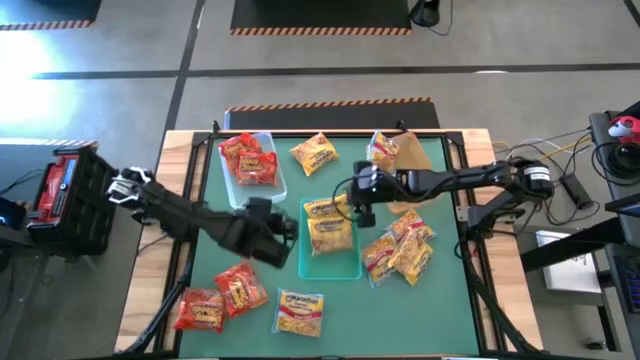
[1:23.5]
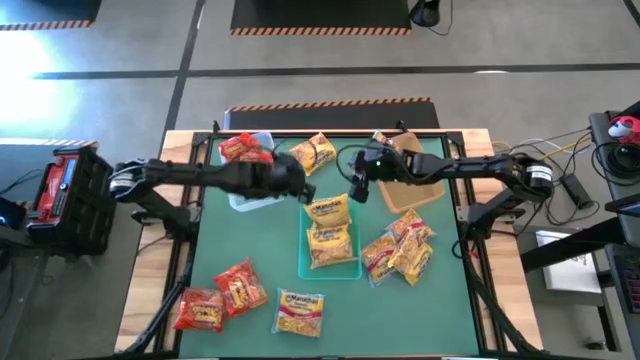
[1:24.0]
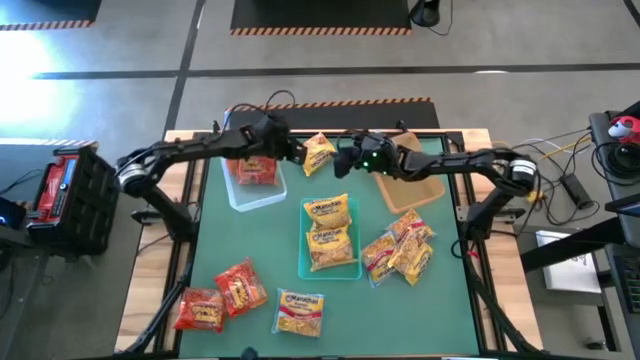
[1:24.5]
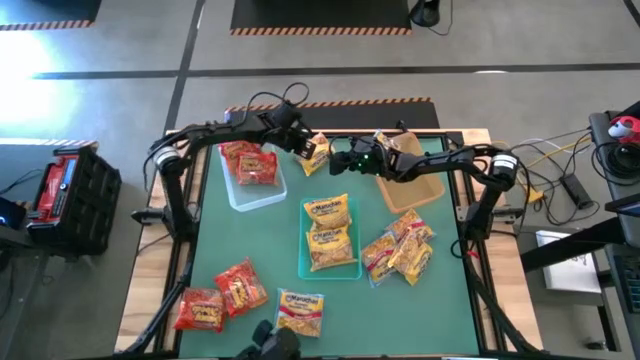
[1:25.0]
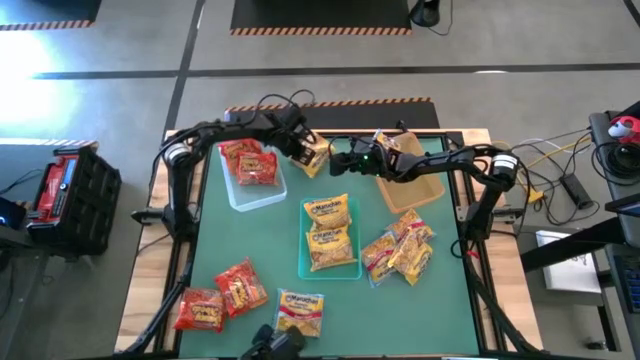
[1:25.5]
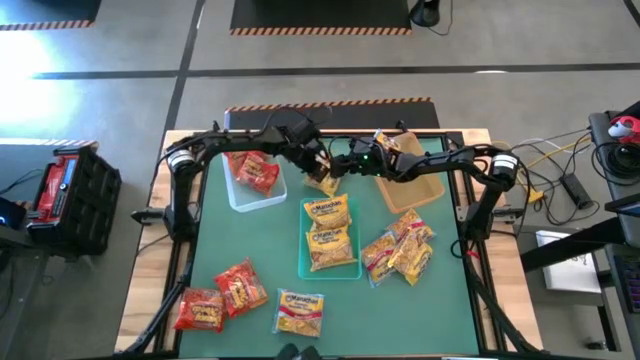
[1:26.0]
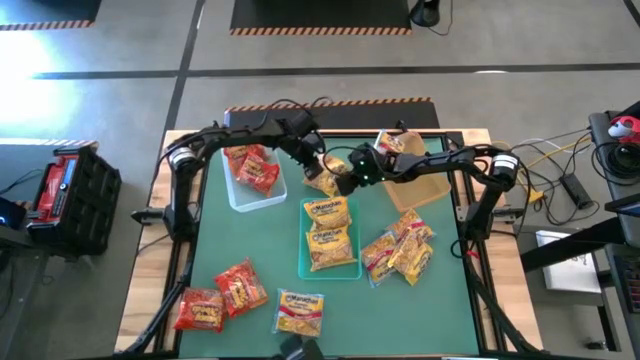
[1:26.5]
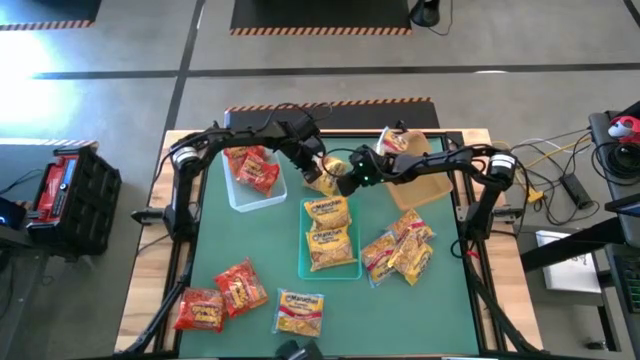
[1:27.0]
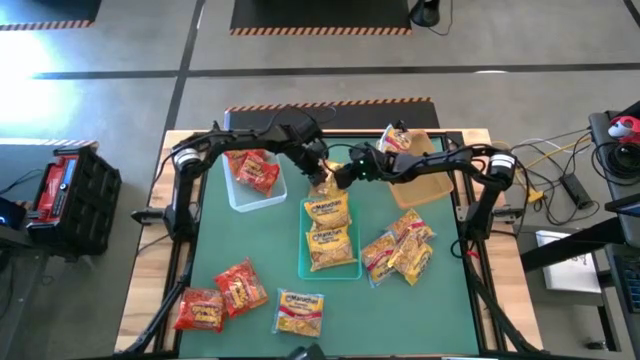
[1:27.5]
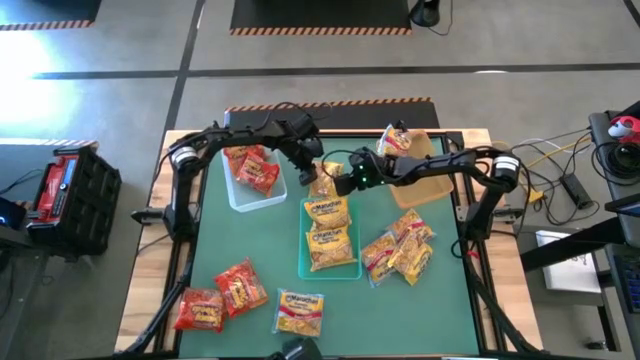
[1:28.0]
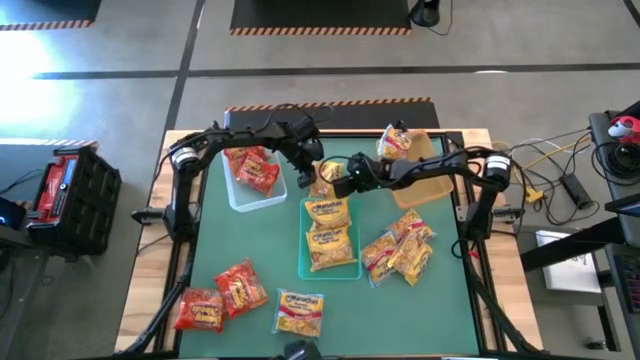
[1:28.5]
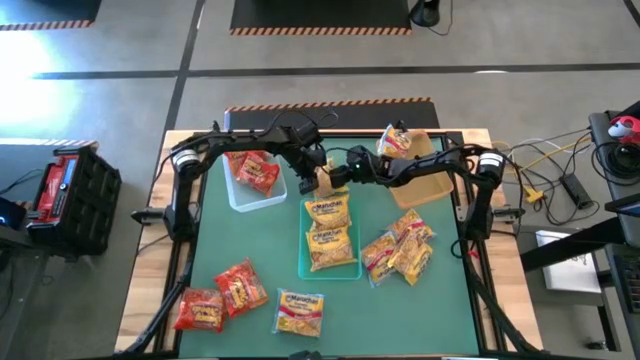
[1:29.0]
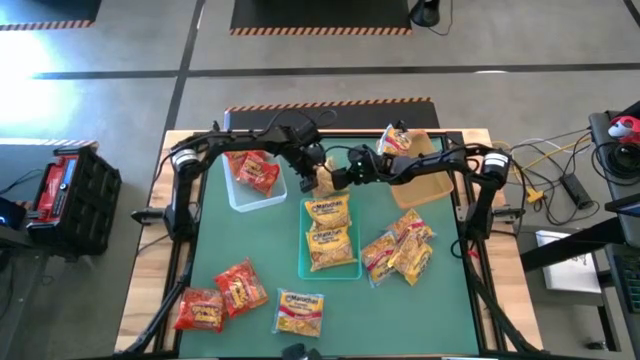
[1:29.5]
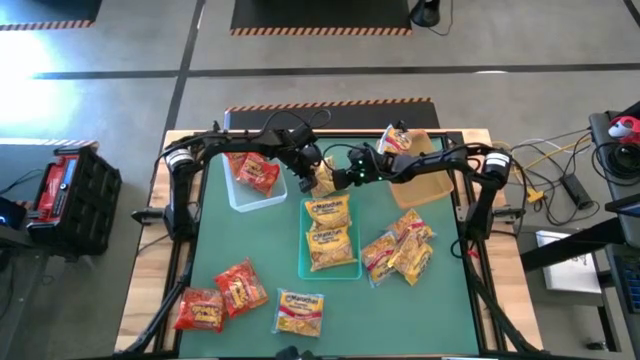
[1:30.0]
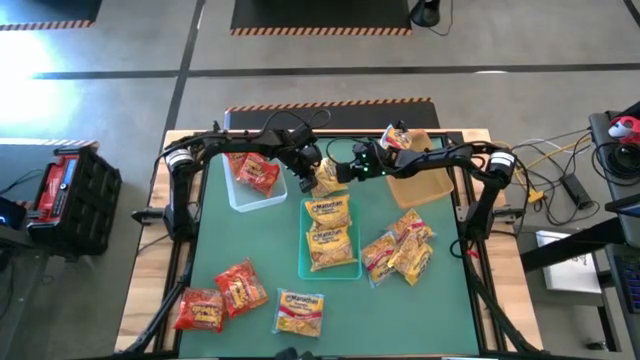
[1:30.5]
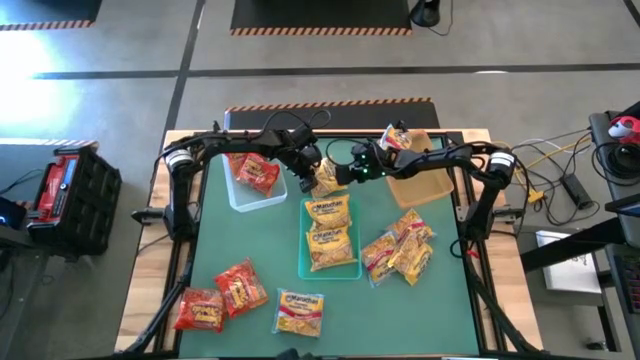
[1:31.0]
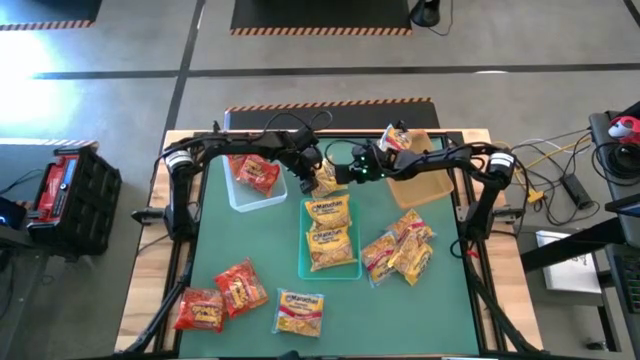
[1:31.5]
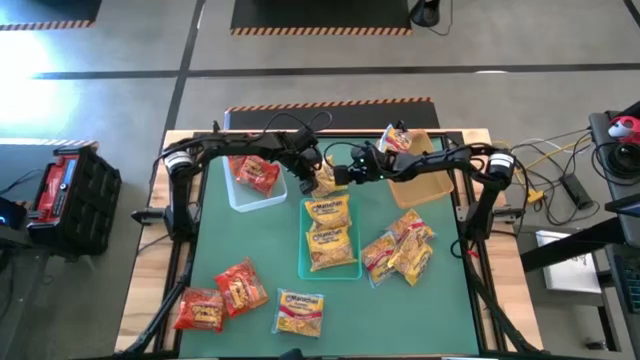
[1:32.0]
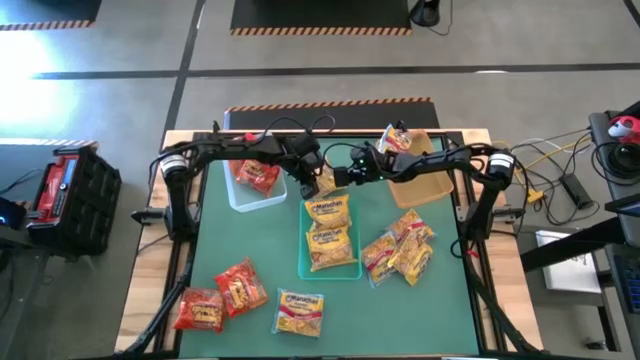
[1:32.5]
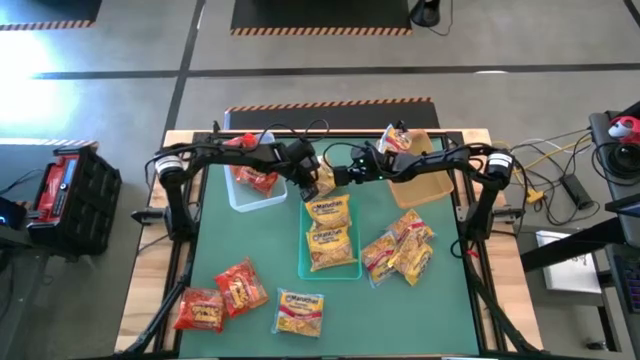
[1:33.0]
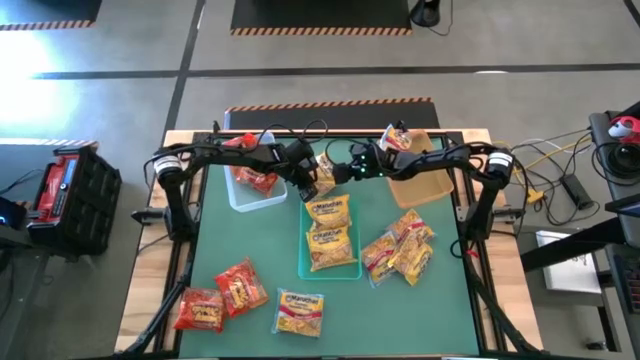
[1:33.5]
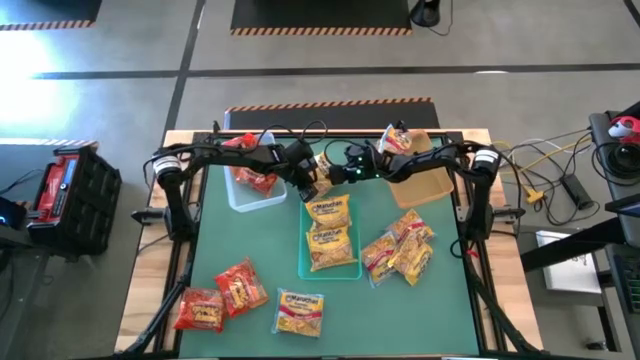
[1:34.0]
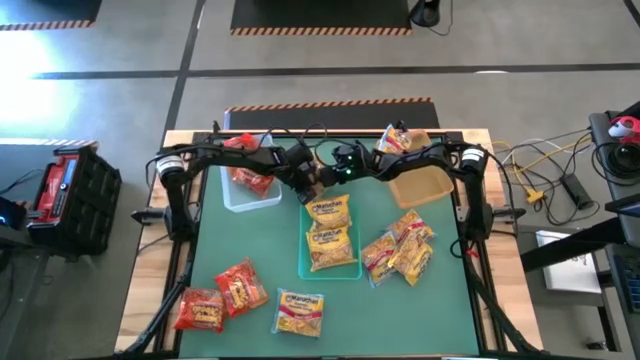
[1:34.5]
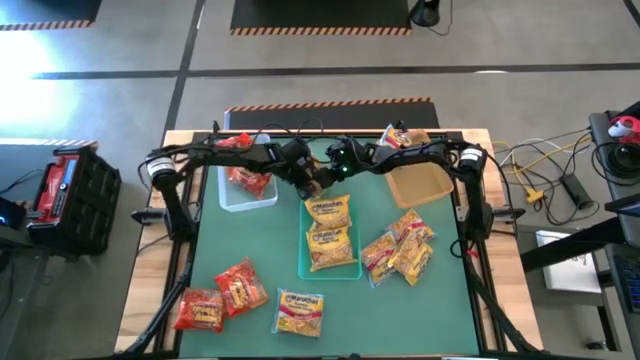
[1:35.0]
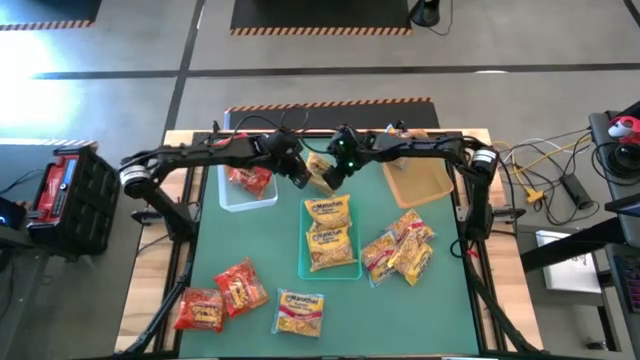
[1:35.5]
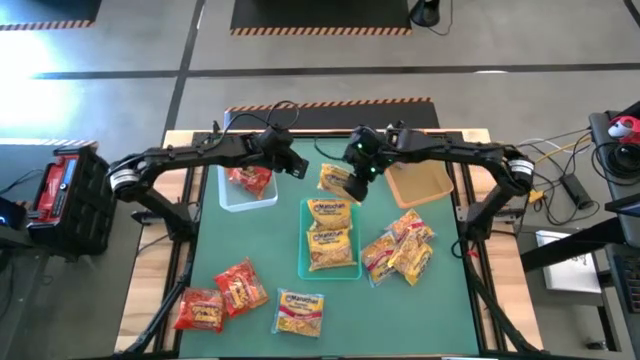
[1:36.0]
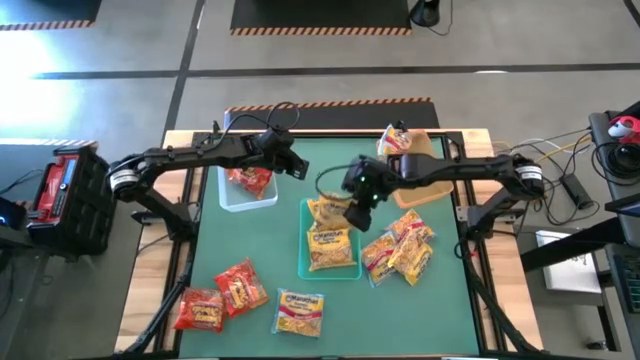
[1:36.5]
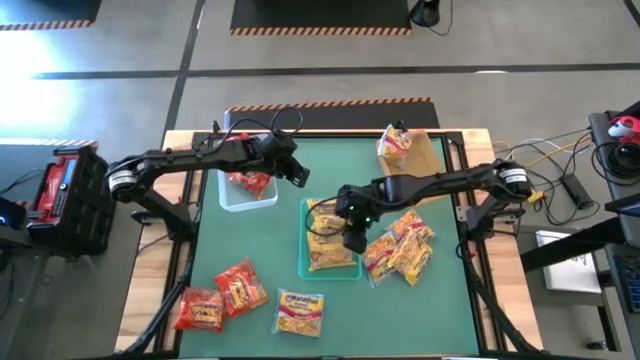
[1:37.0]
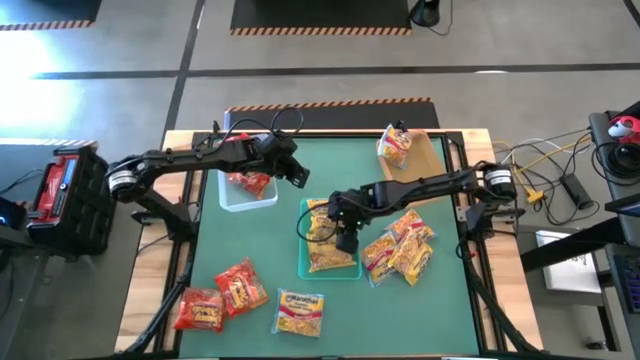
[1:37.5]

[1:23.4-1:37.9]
Task: Sort Maruchan noodles
Put the yellow noodle pack into the blue bin

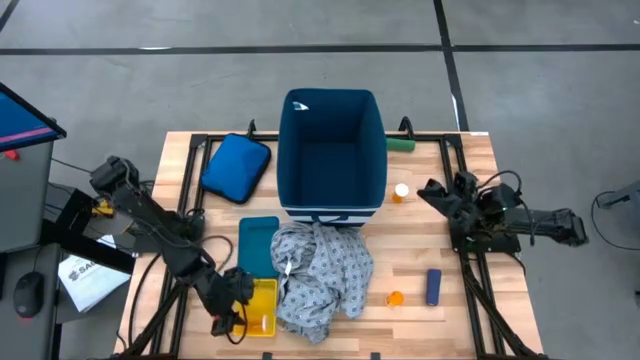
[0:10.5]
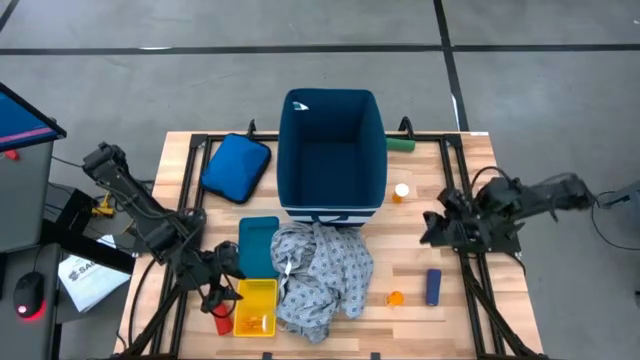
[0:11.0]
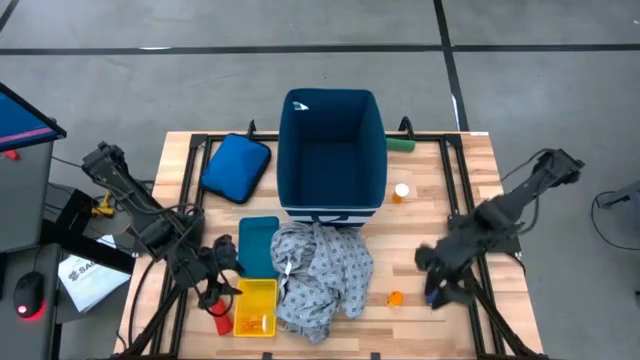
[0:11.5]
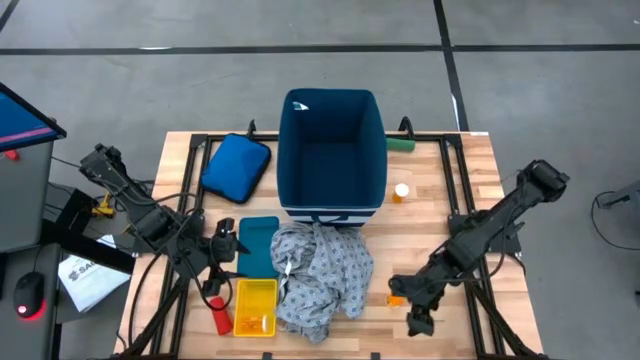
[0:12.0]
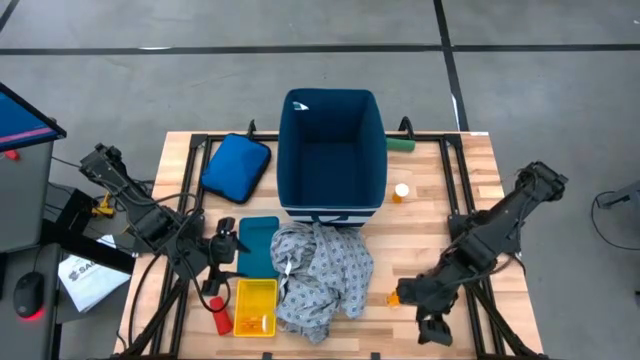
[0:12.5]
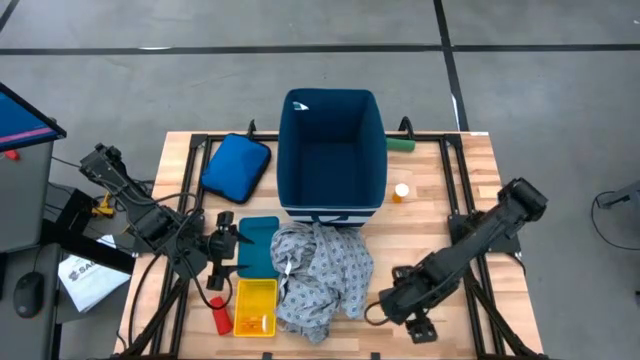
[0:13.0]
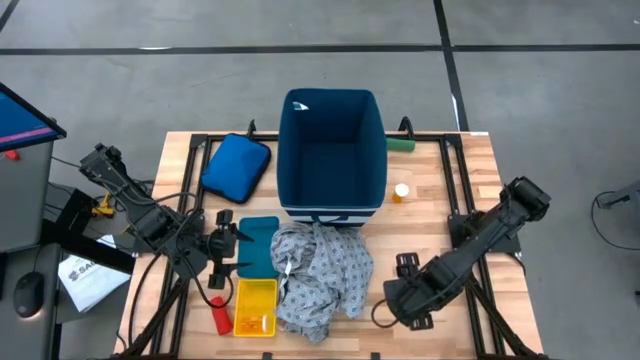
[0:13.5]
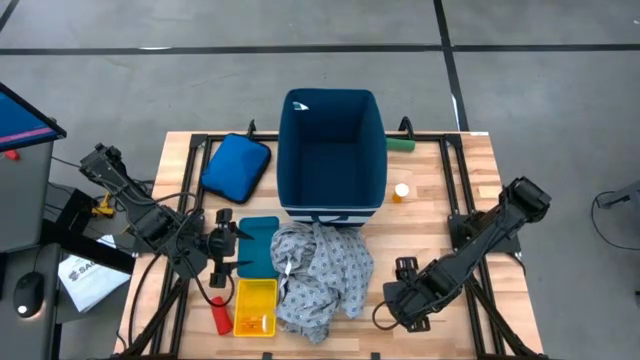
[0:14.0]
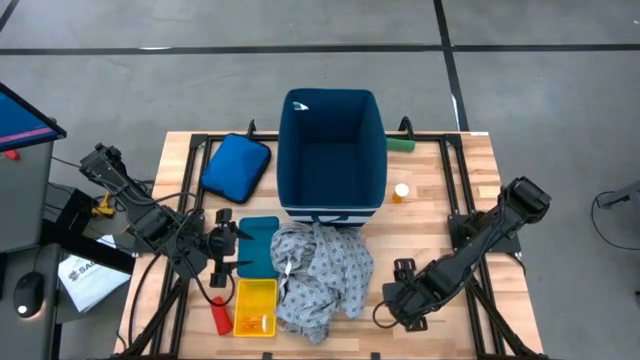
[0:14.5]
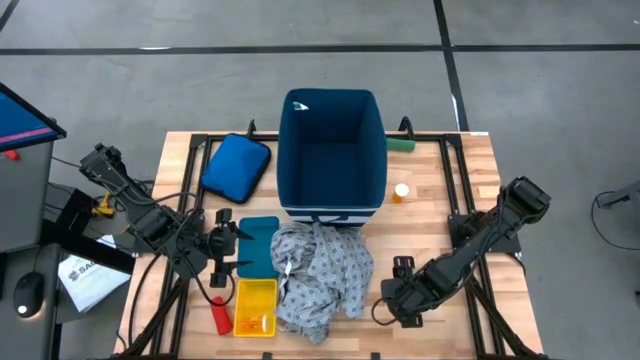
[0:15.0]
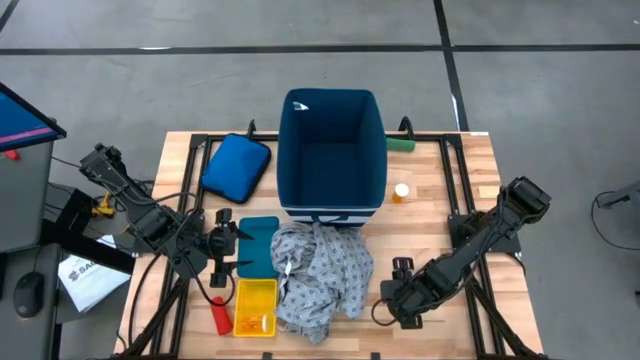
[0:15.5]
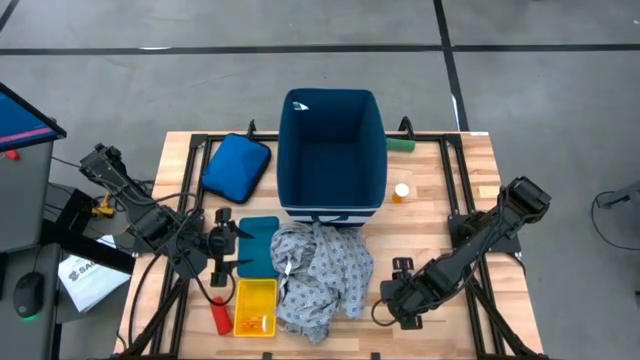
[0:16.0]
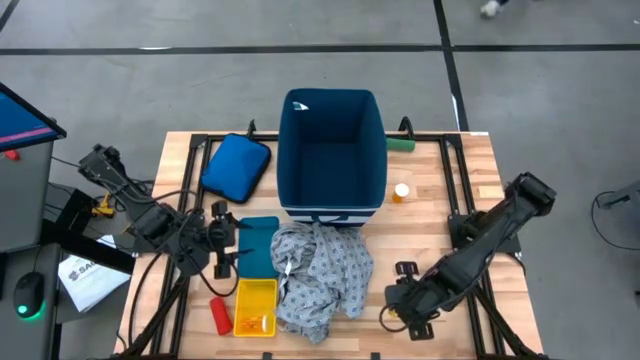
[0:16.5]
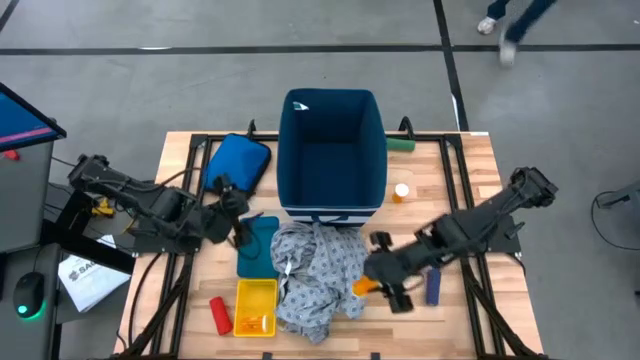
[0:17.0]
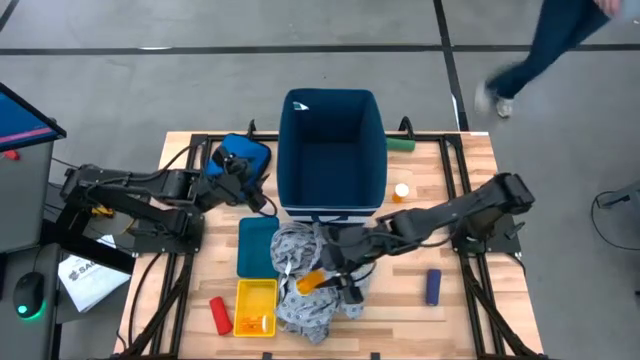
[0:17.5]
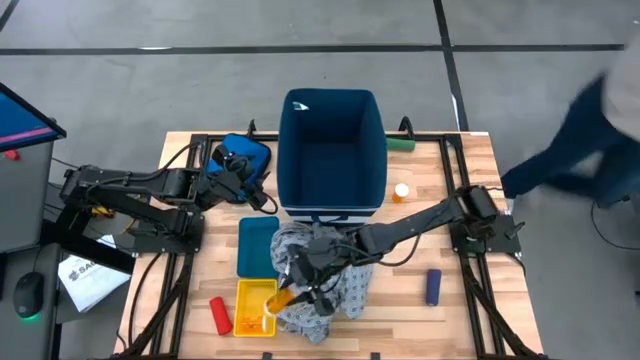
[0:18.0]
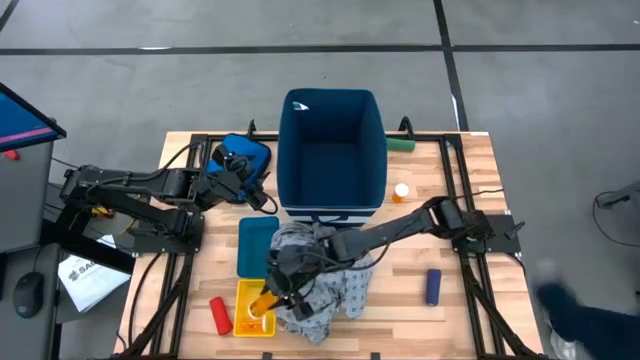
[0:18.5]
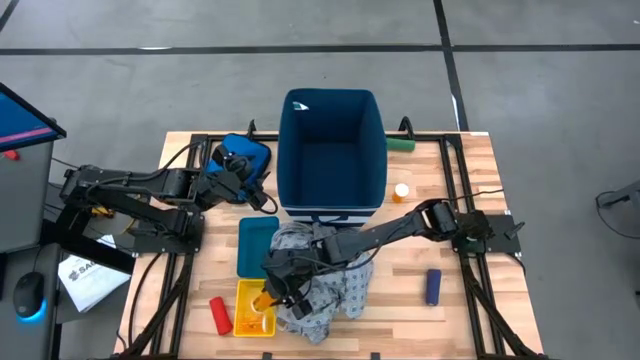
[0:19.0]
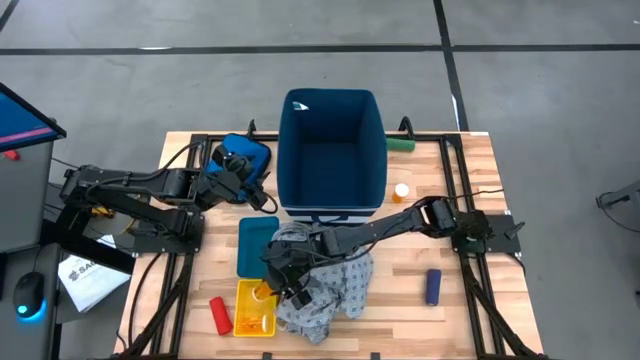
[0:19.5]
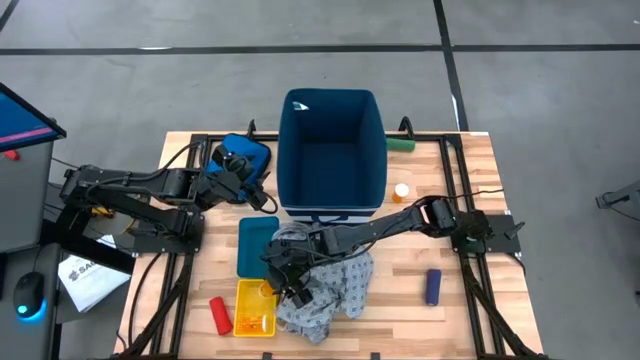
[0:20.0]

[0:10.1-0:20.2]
Task: Pick & place medical supplies in basket/bin
Put the bottom orange pill bottle into the yellow bin
